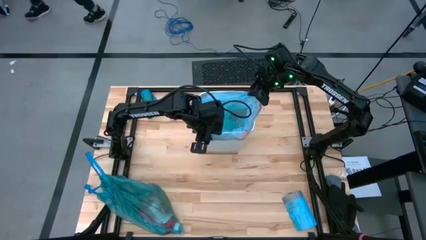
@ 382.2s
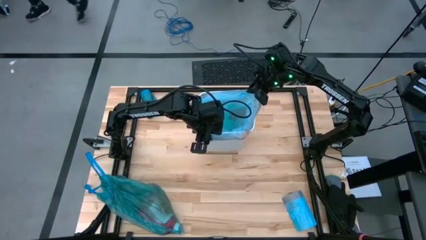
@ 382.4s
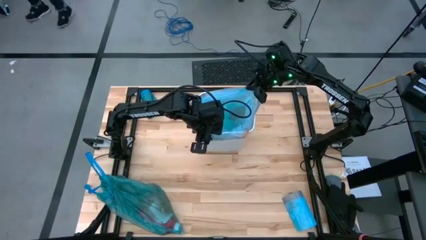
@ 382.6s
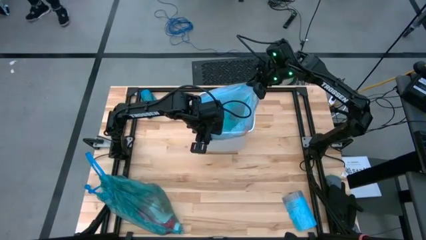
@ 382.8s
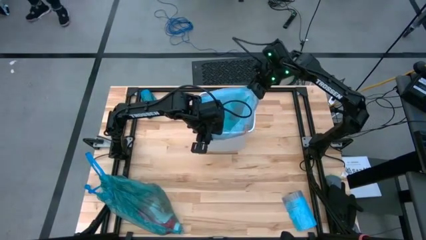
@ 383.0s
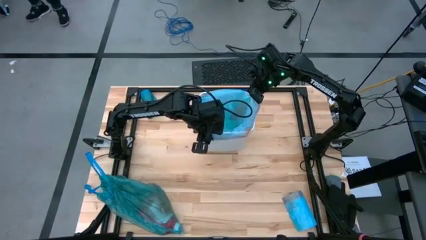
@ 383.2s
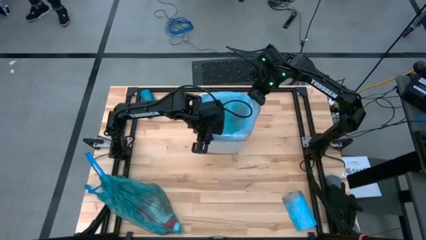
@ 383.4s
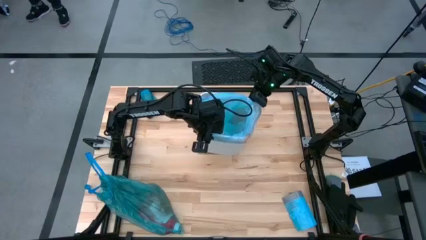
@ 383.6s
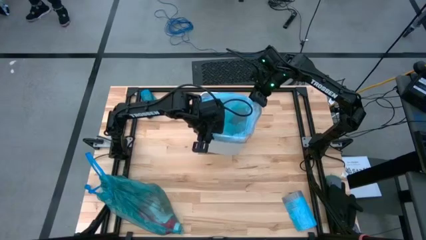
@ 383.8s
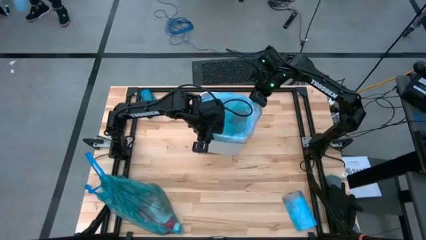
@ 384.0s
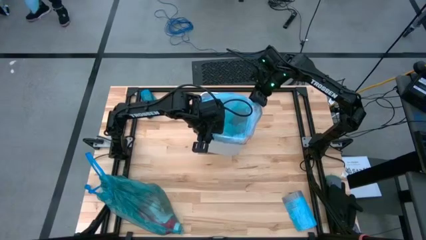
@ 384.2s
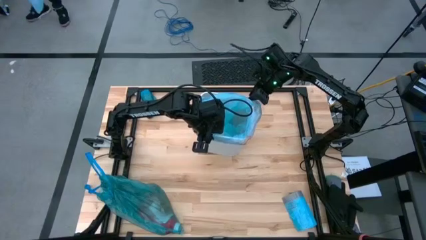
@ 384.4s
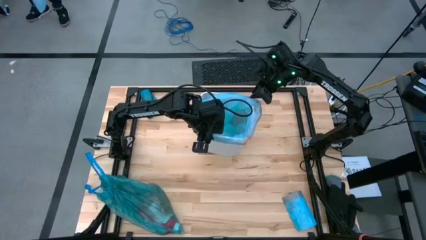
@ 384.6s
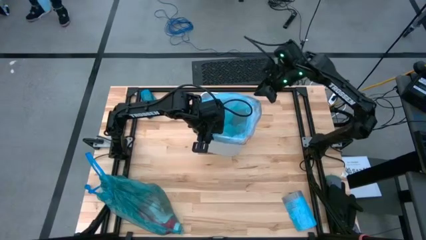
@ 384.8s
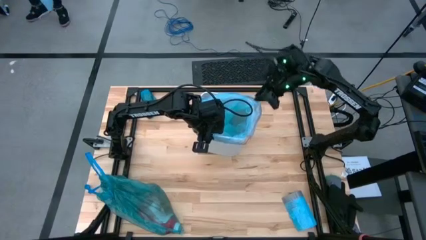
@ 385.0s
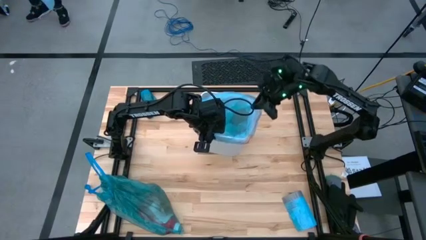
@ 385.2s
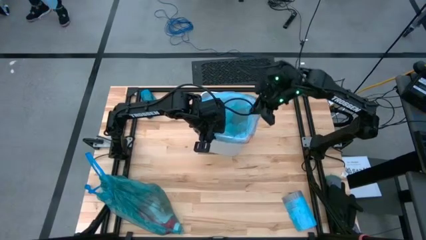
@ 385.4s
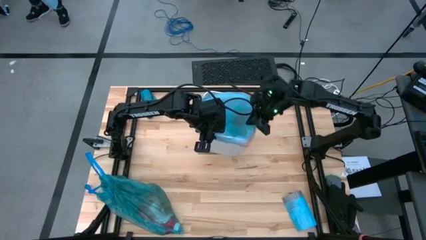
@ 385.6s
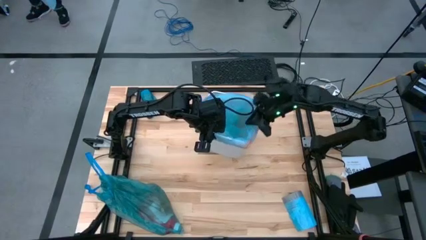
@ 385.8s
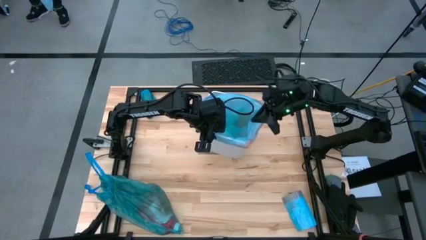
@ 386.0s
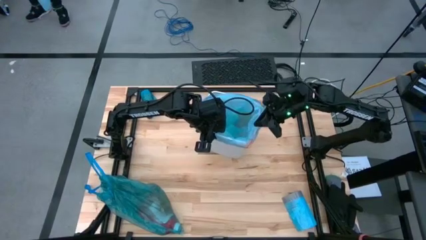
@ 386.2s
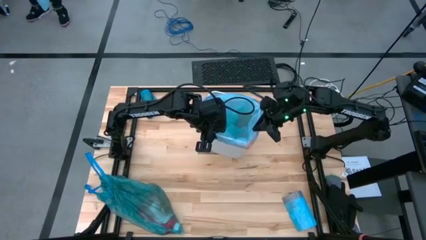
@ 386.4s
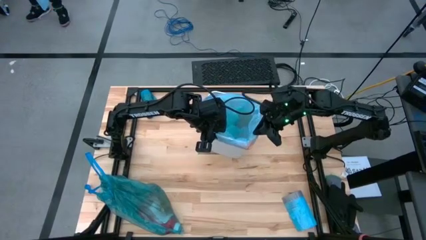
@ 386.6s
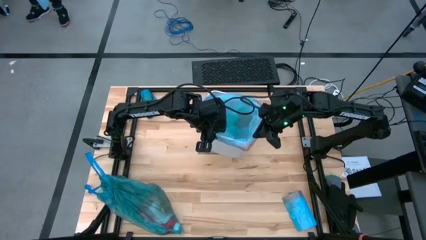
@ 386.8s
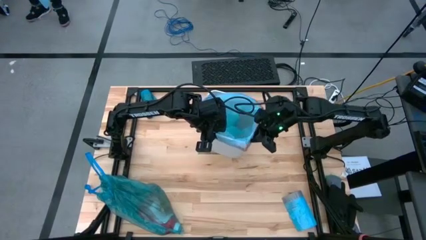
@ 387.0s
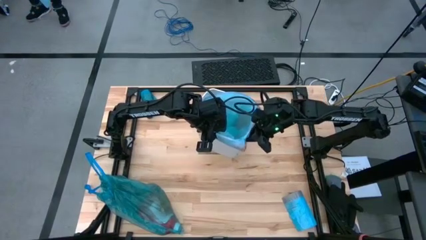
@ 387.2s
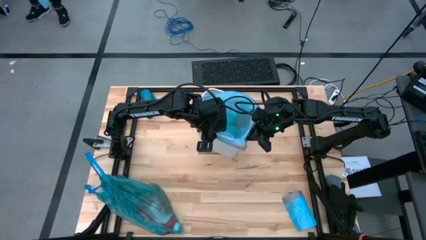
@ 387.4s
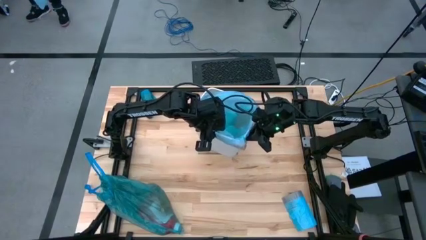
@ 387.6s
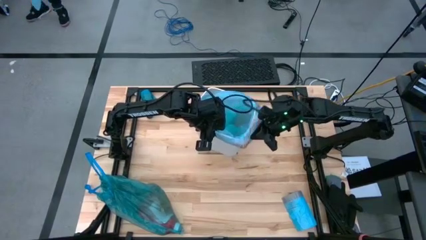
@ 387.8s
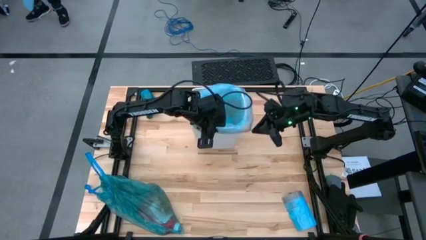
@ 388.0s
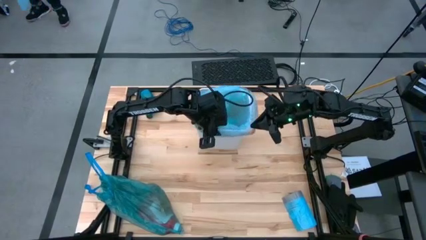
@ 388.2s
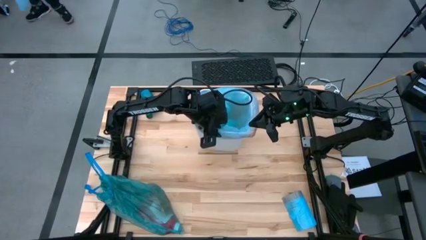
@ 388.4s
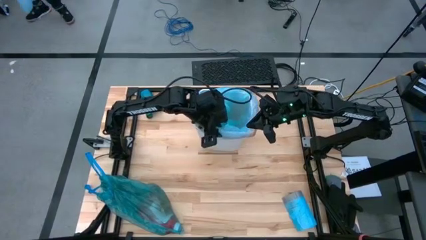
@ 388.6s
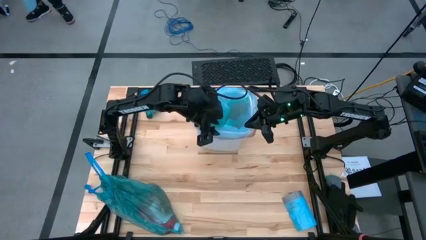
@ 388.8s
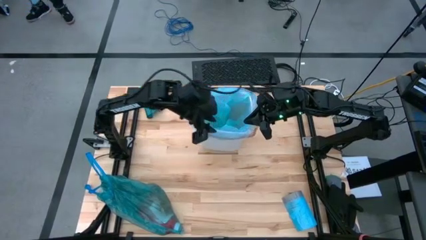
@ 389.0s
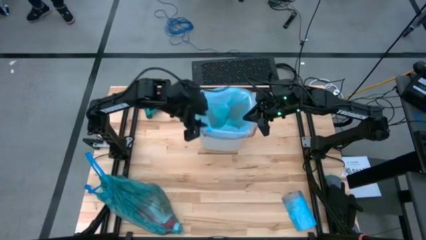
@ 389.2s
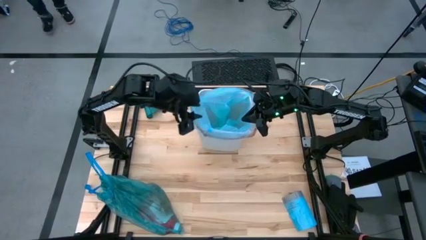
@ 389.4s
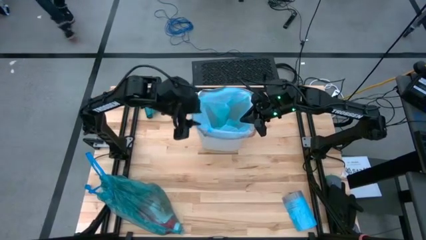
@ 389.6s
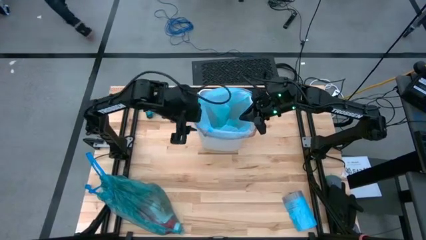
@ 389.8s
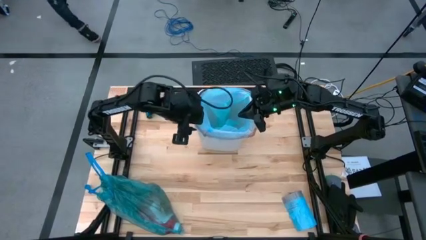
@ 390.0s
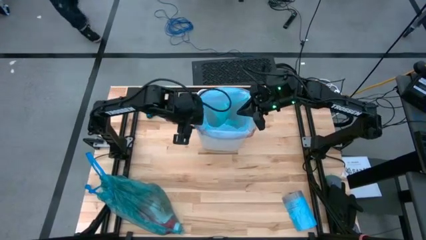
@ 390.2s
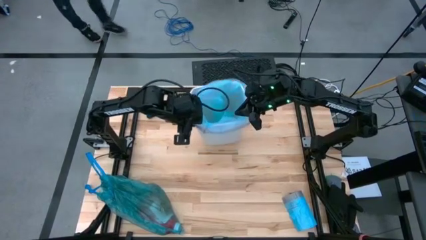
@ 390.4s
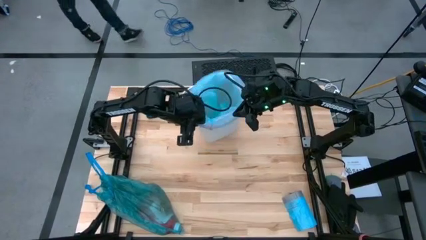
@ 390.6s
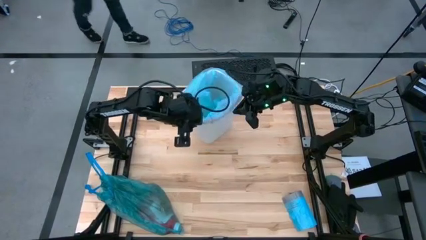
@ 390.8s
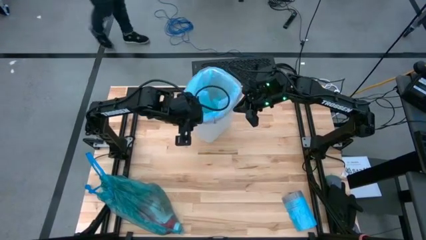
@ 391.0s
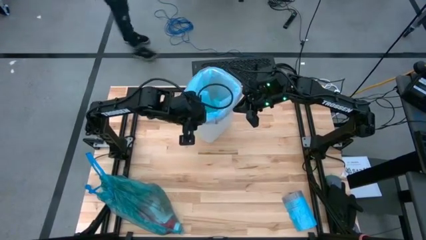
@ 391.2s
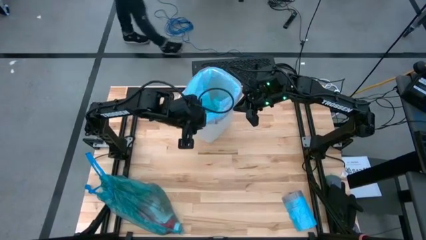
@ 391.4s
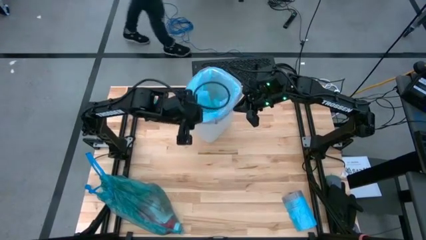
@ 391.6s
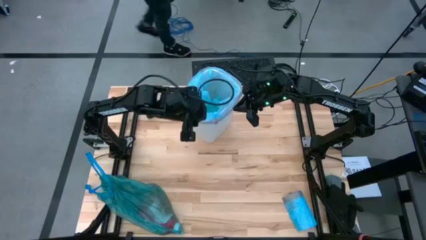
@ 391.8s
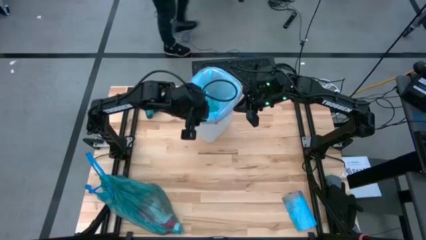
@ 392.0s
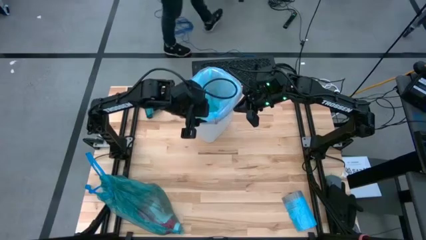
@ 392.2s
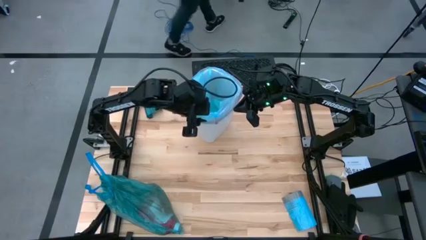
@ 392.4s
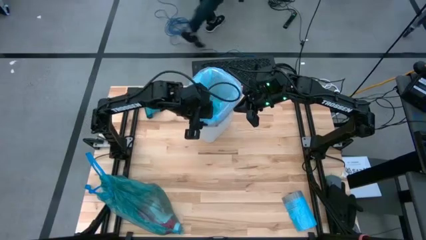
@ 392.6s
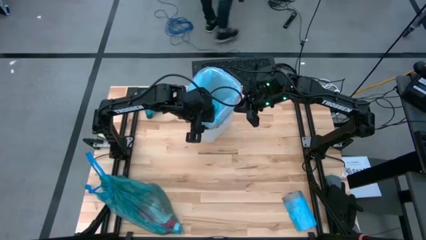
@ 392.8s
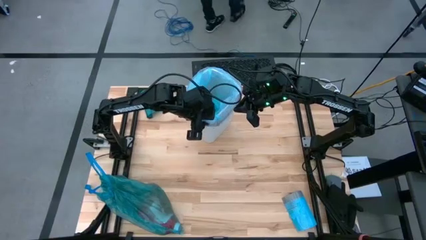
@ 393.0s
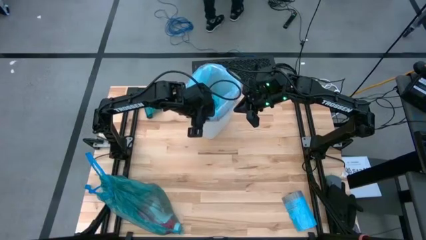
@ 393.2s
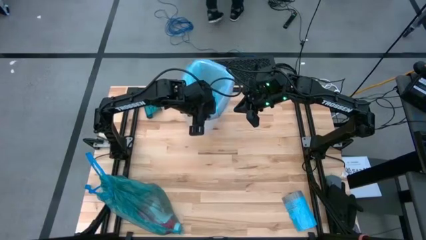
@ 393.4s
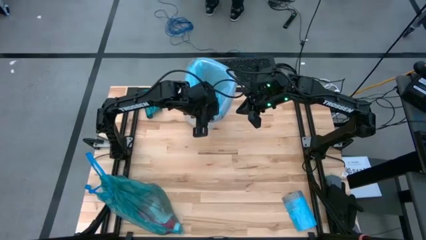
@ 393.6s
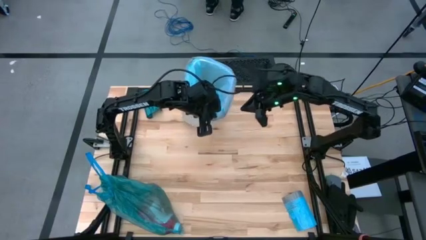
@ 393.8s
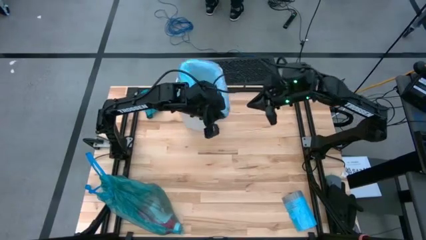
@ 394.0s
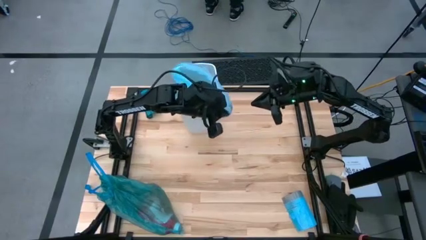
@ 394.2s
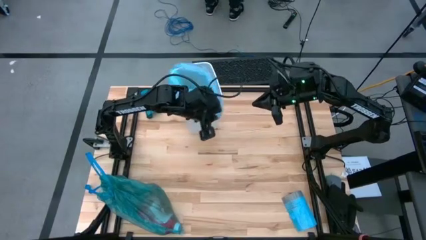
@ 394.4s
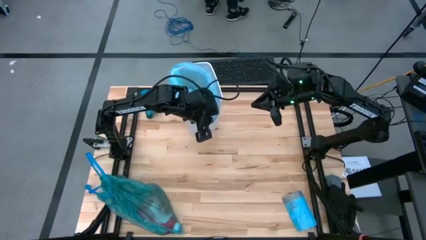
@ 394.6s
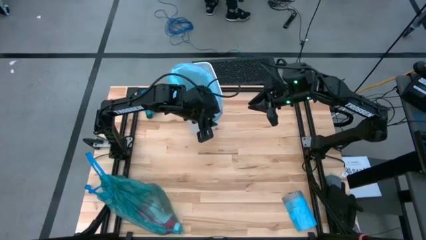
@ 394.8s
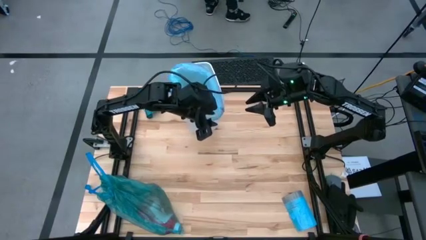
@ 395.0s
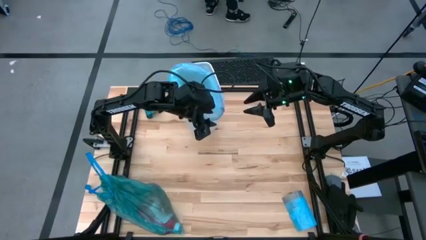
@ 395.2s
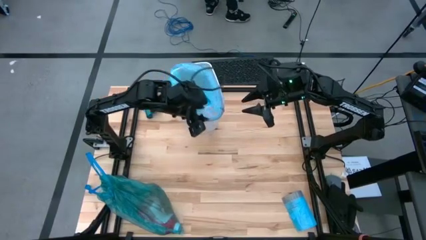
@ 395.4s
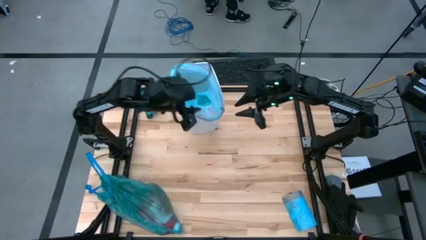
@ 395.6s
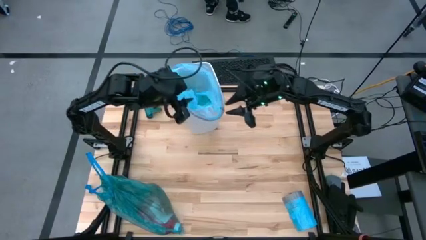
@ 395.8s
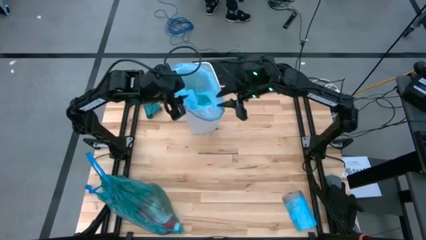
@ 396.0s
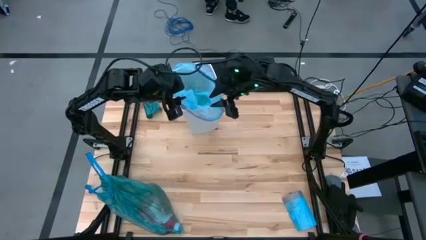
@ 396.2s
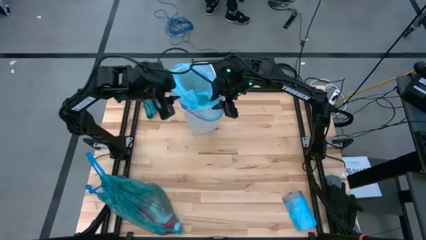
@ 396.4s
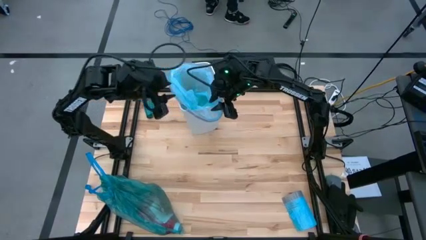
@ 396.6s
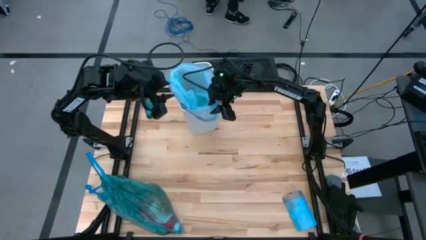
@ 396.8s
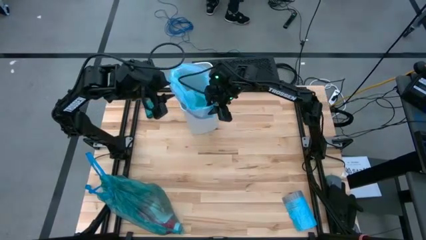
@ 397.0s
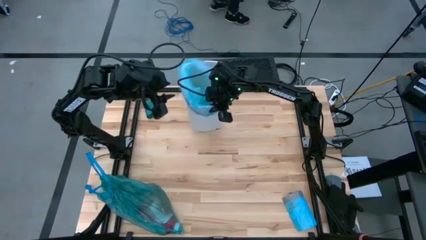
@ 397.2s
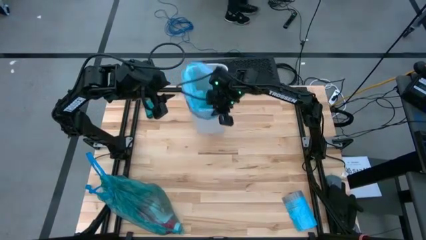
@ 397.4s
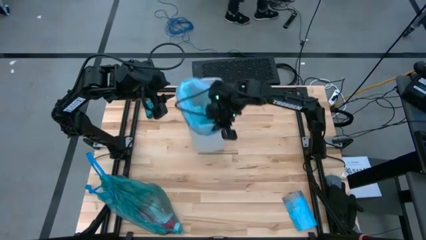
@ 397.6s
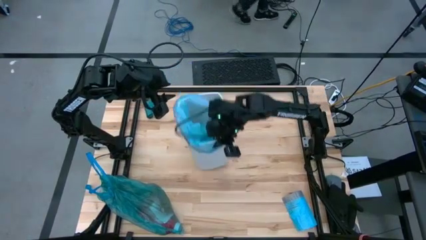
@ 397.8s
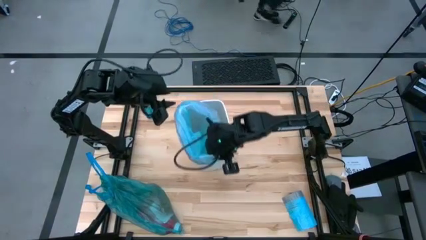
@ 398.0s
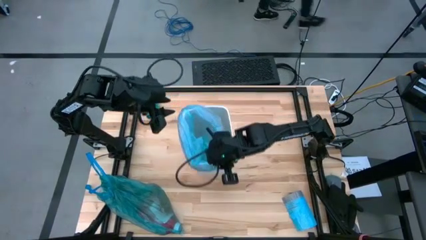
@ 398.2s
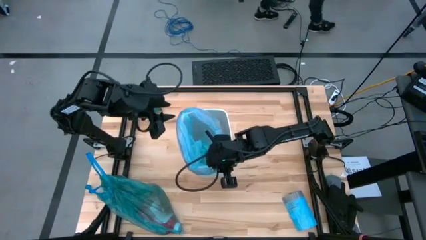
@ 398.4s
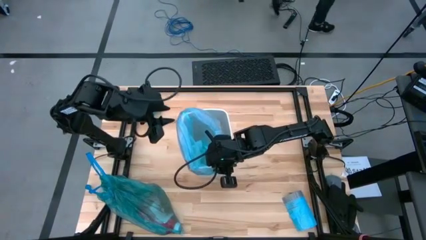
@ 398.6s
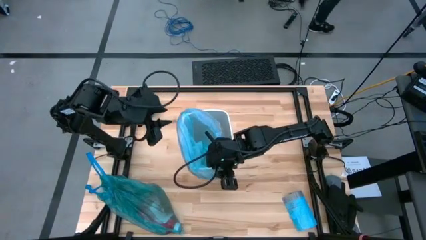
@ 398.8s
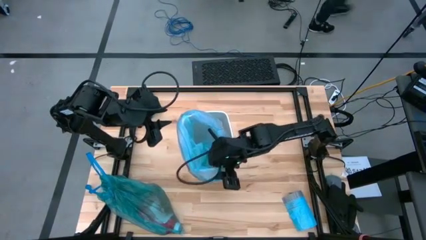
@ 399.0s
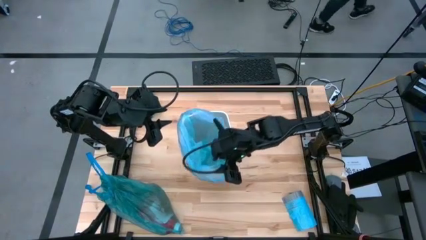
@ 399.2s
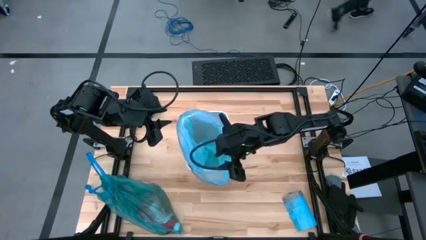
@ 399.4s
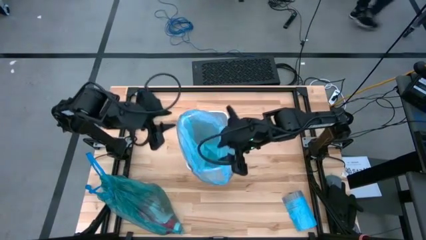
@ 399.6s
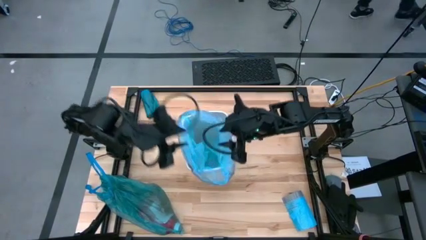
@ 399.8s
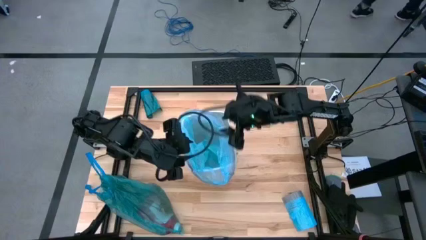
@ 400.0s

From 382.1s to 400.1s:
Task: place trash/remove bag and relplace
Insert the new blue trash bag into the white trash bin
